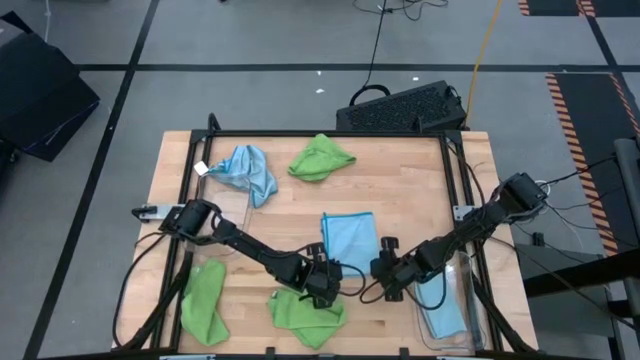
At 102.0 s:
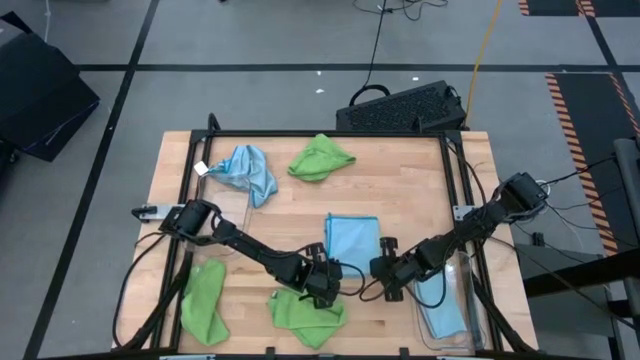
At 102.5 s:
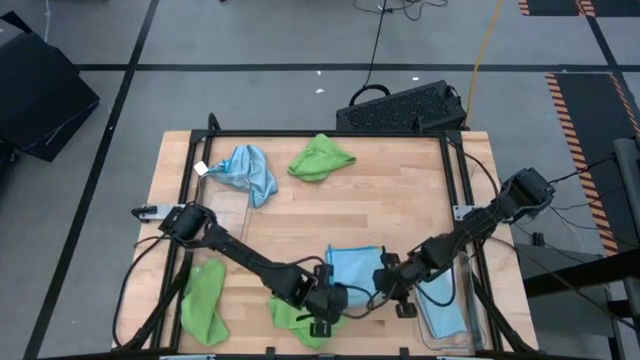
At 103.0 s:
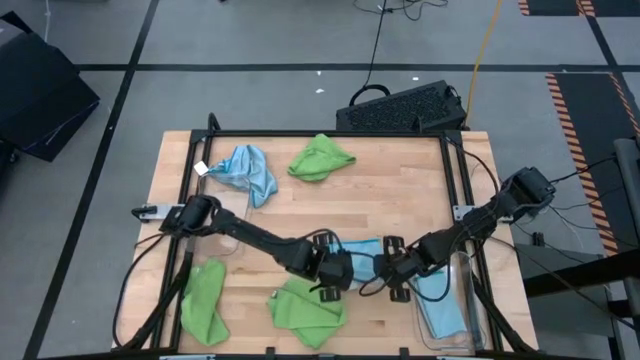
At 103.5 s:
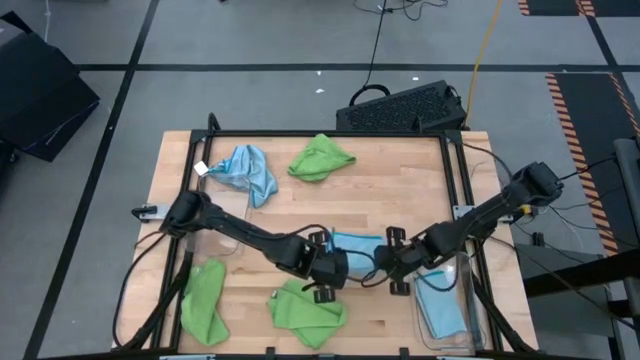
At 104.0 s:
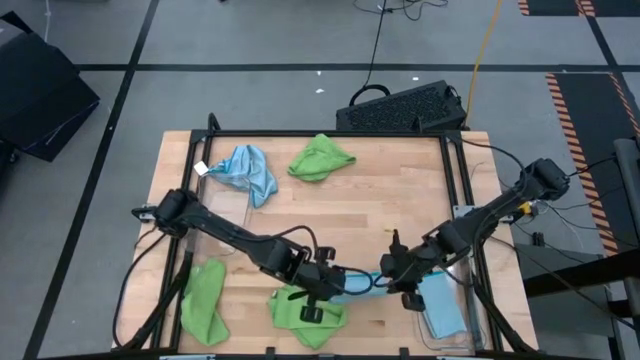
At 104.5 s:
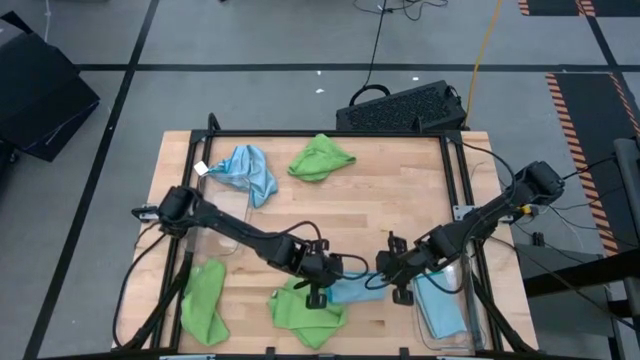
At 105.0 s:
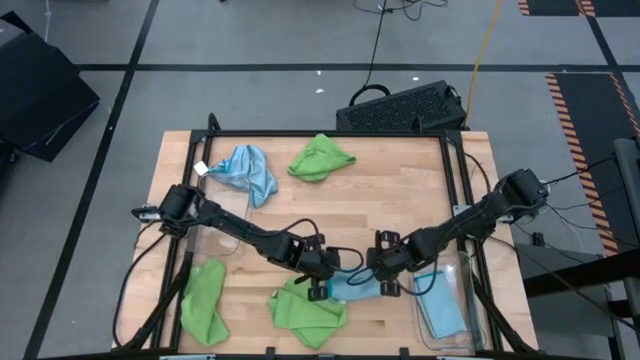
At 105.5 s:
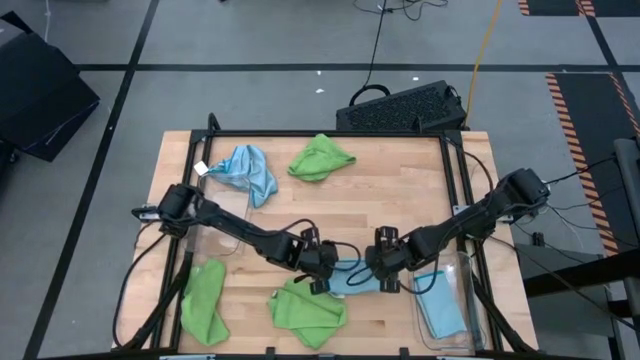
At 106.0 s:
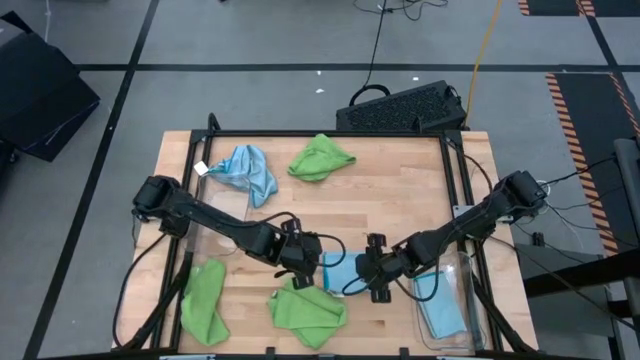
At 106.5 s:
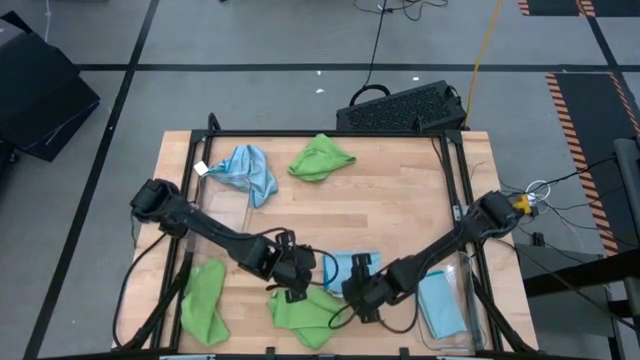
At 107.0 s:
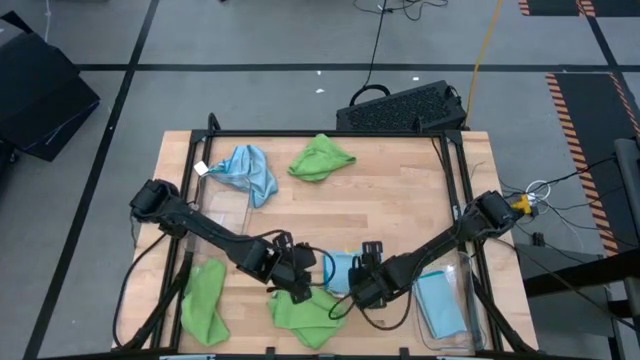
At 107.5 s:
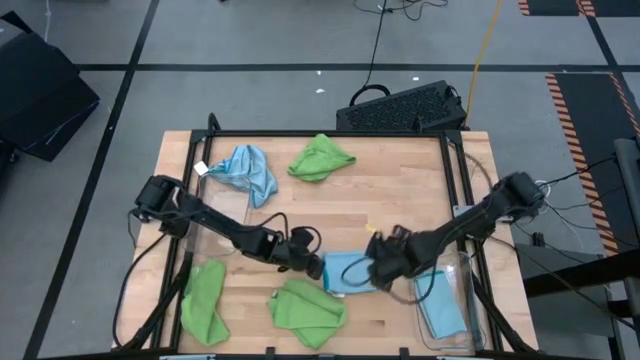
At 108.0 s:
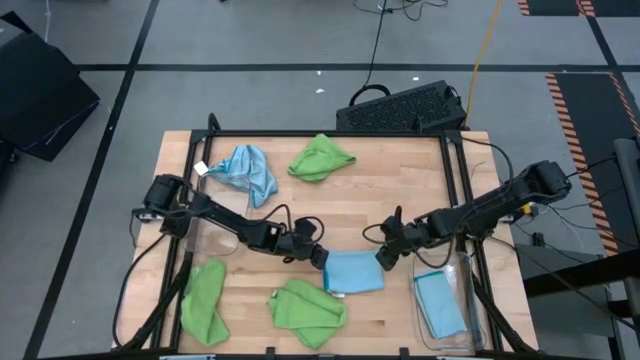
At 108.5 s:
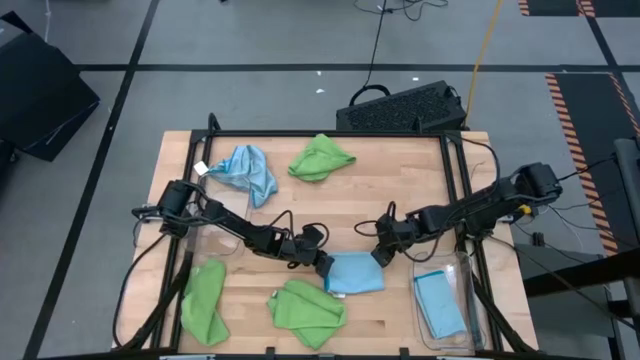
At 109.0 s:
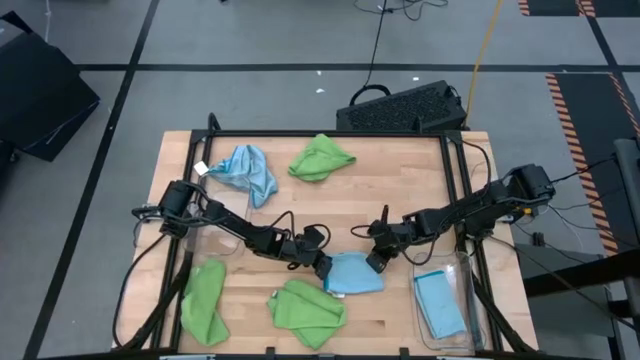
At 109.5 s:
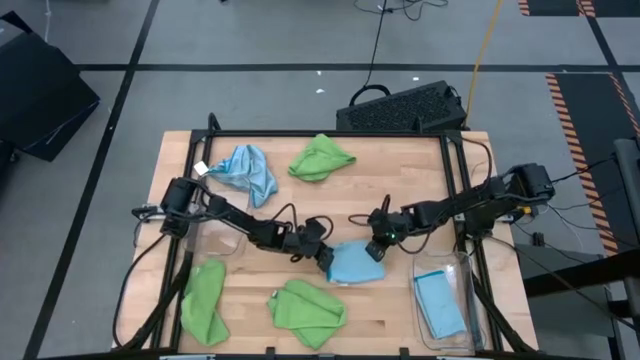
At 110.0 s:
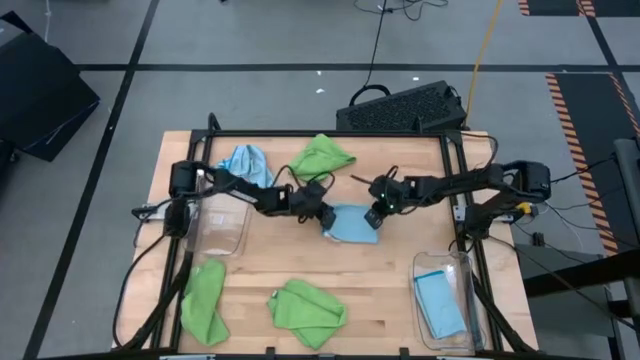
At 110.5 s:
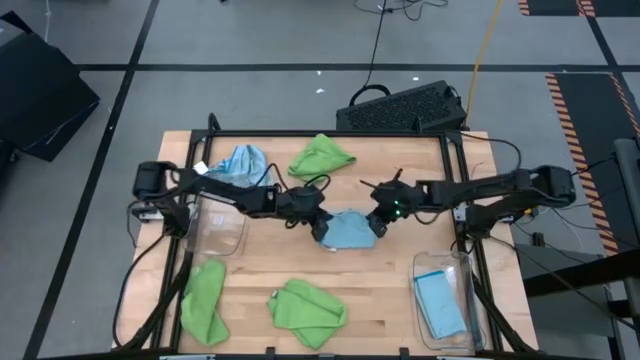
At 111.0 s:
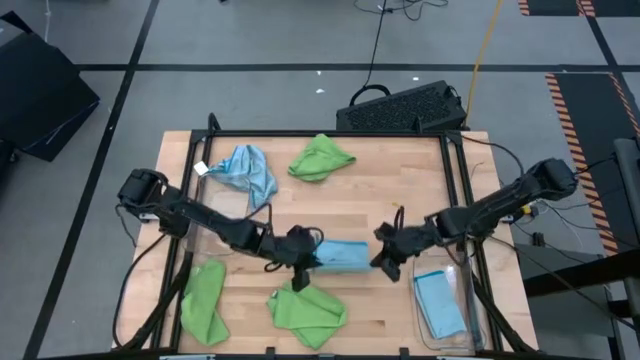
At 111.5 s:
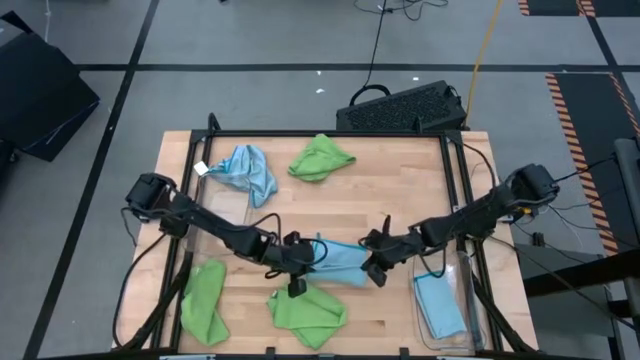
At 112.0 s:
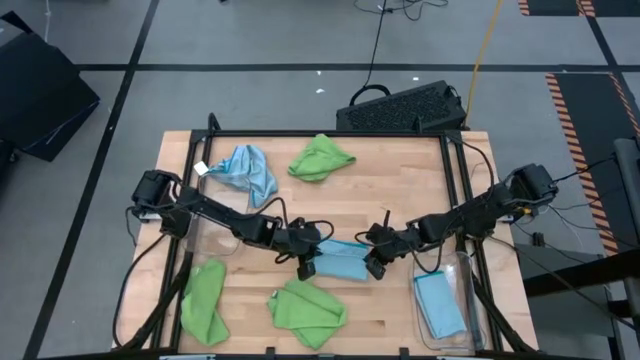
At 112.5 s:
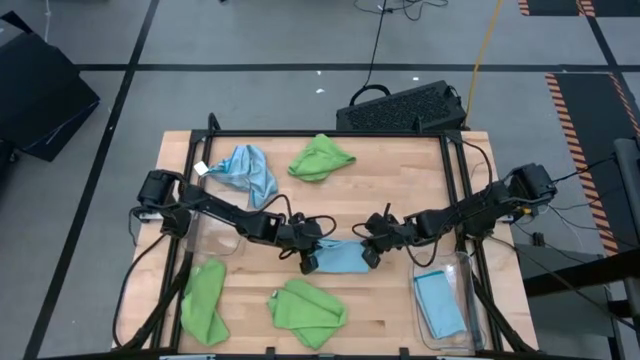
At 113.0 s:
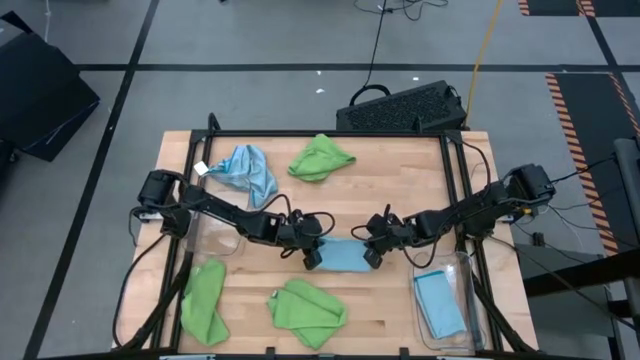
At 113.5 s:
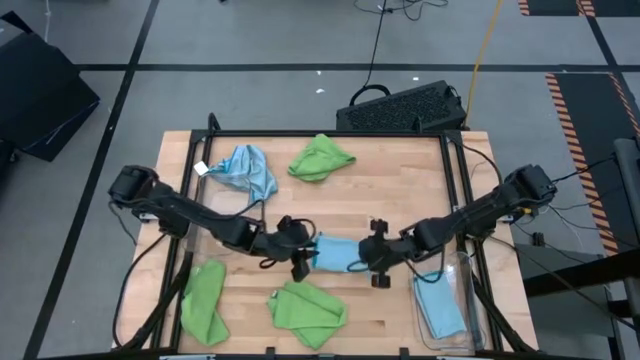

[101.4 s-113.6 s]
Task: Sort microfiber towel by color & place in baskets
Fold the right blue microfiber towel

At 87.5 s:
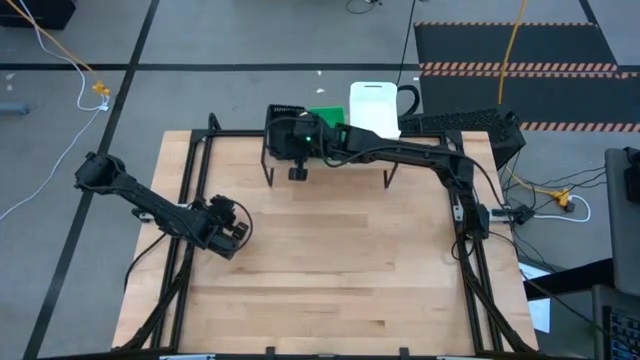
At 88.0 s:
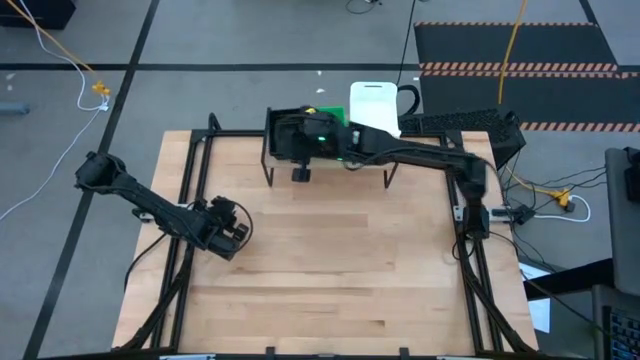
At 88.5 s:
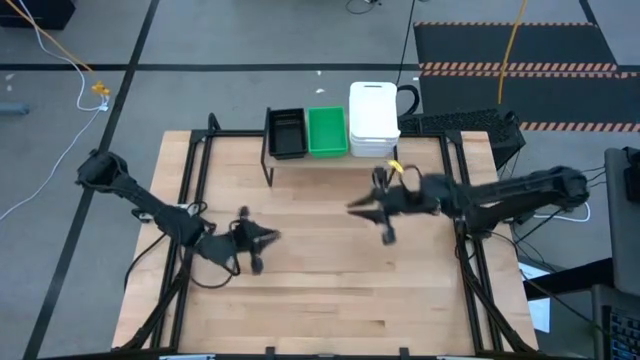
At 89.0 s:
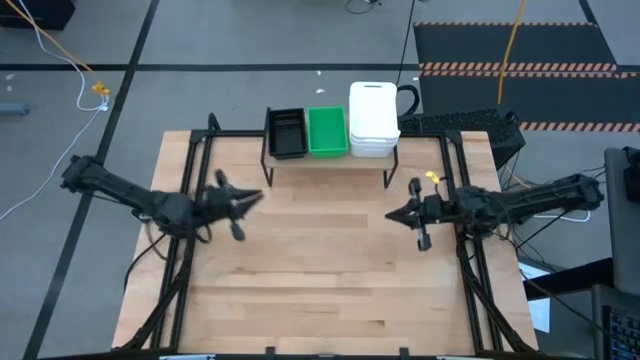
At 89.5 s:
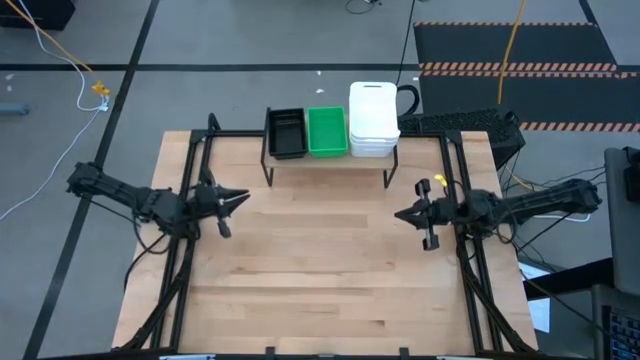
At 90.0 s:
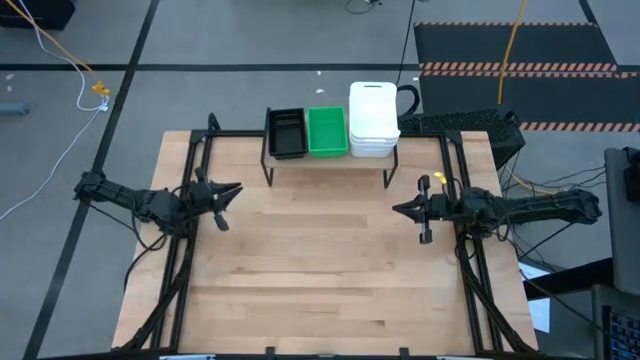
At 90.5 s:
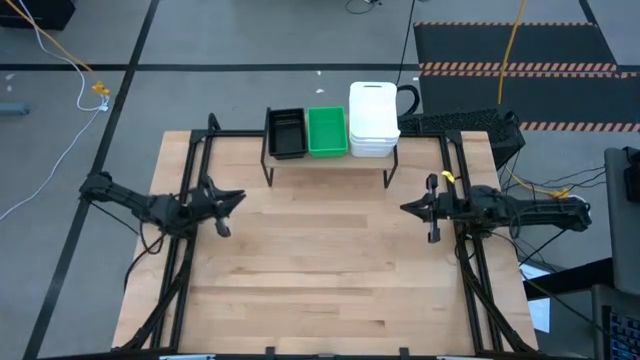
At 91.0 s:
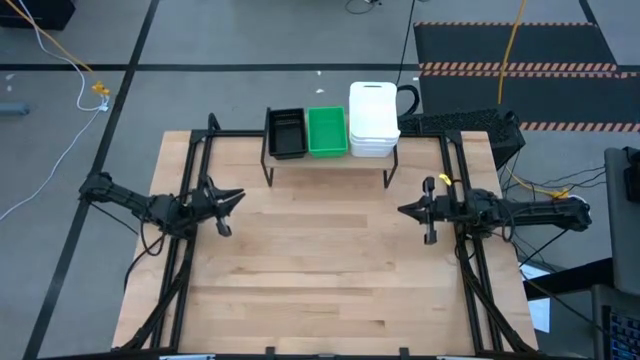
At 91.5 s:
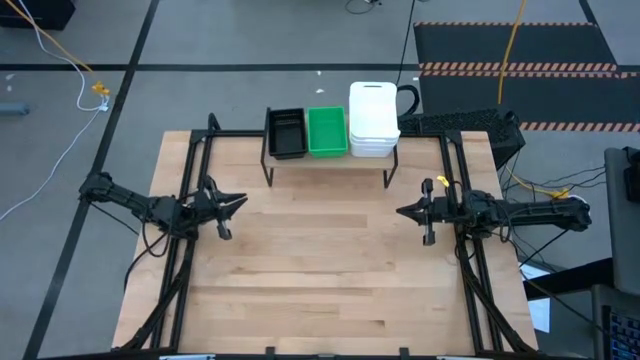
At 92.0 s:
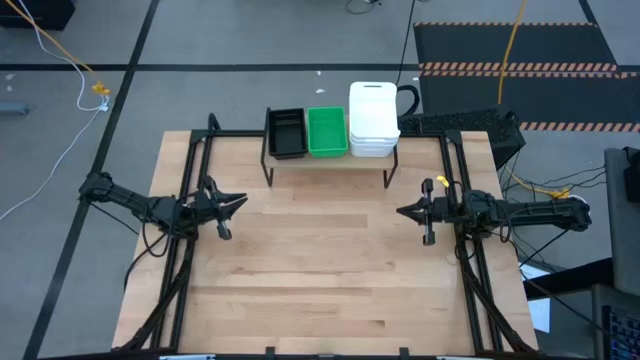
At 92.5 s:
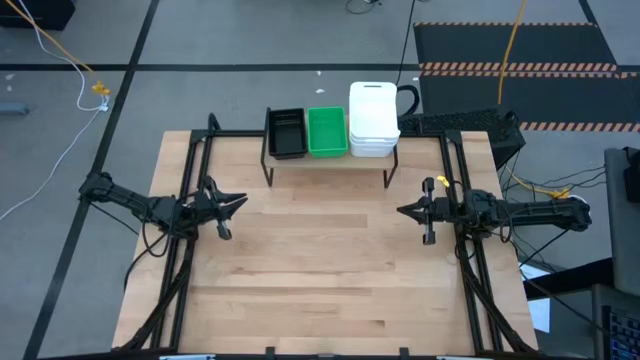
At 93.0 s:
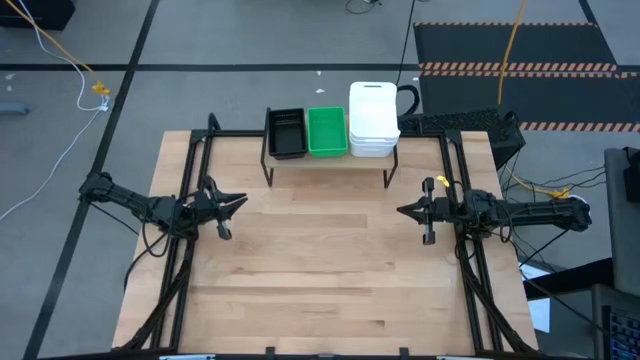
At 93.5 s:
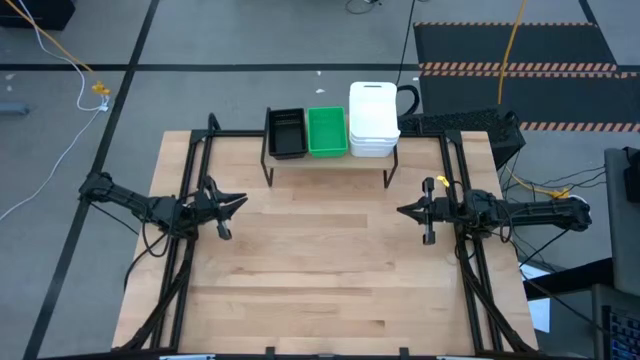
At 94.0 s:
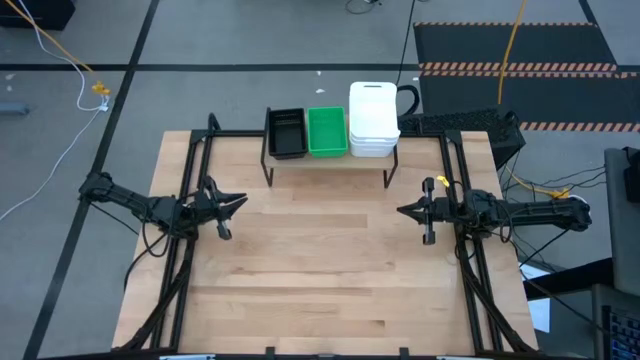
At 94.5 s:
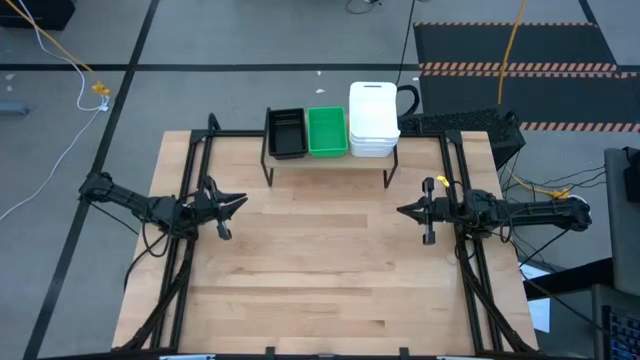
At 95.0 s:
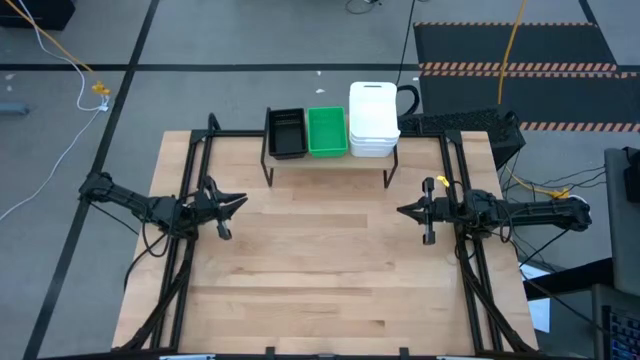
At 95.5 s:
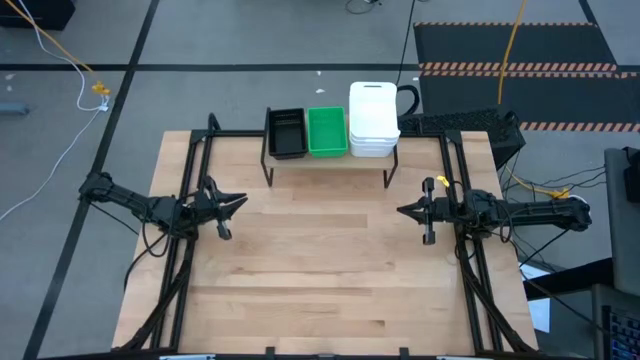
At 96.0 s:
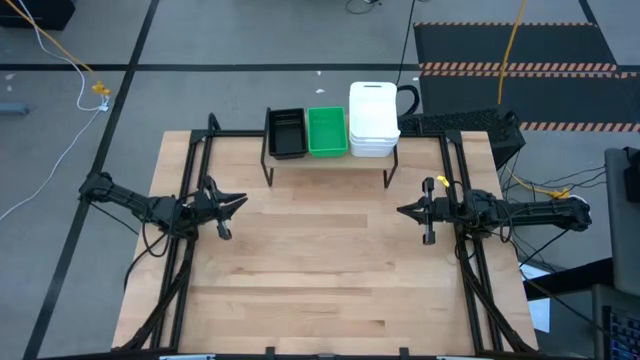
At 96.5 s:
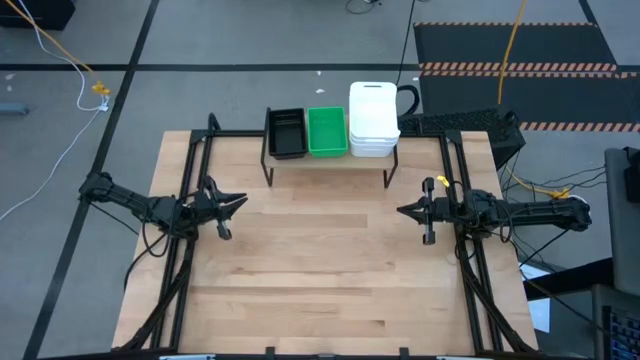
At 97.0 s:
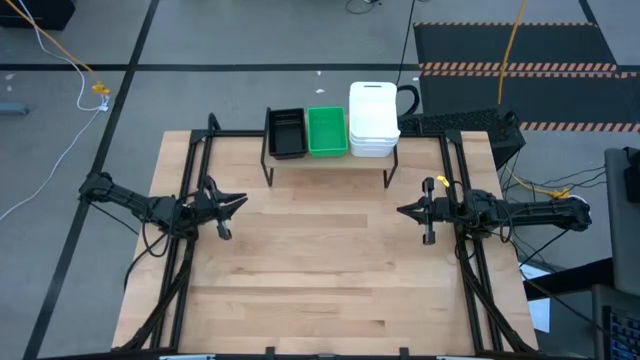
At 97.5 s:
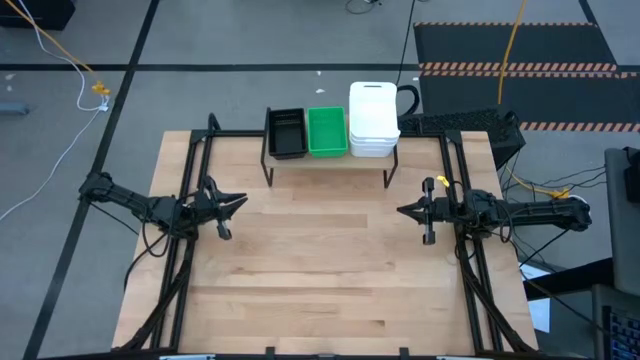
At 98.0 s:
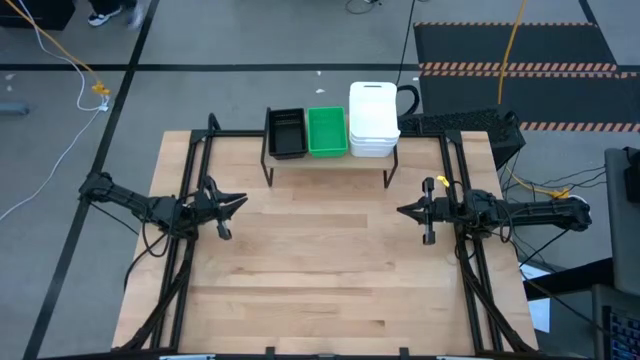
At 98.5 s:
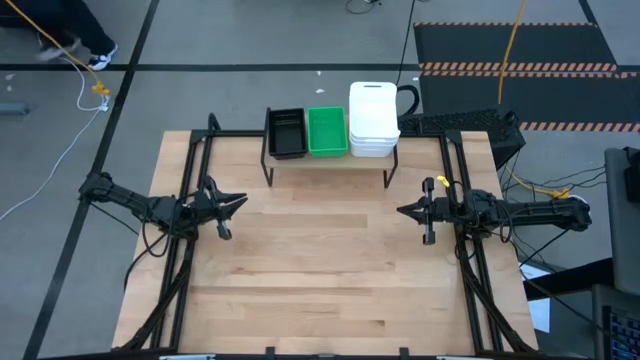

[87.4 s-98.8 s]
Task: Stack baskets on shelf by color
Return to Home Position
